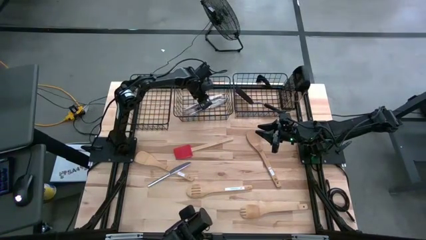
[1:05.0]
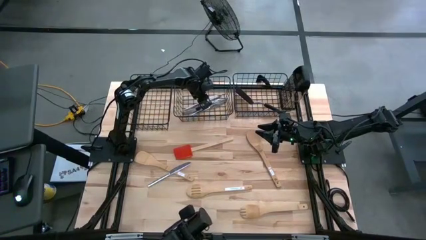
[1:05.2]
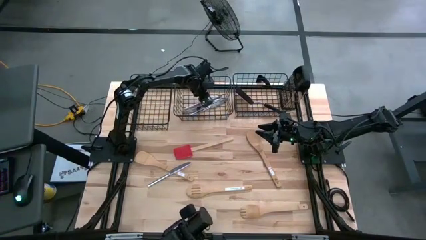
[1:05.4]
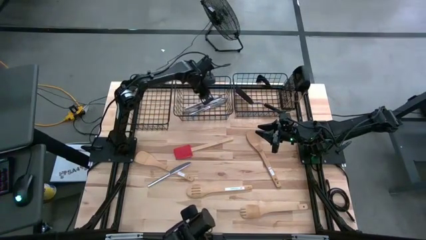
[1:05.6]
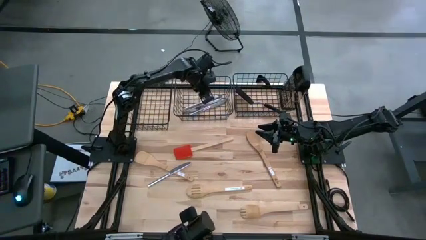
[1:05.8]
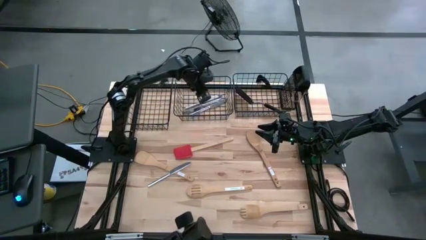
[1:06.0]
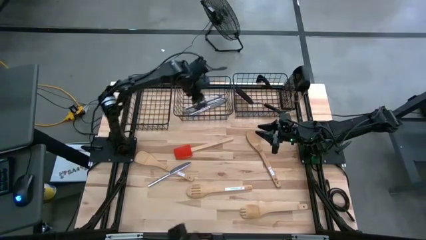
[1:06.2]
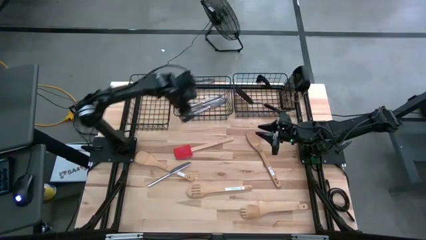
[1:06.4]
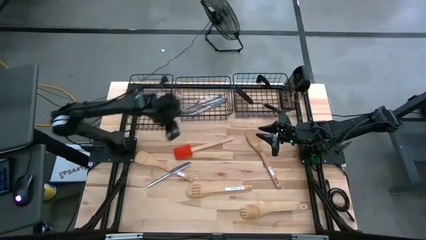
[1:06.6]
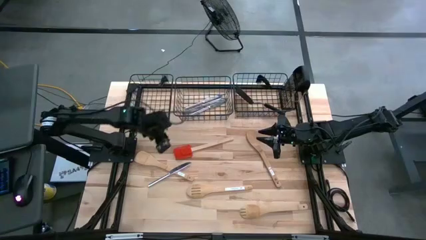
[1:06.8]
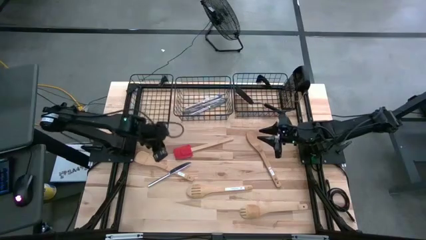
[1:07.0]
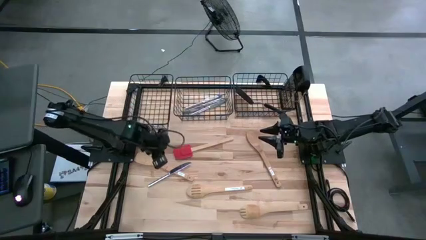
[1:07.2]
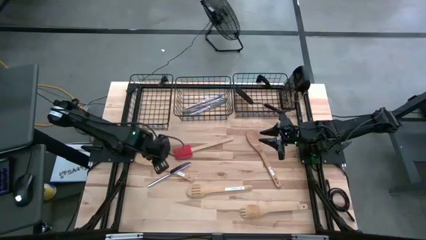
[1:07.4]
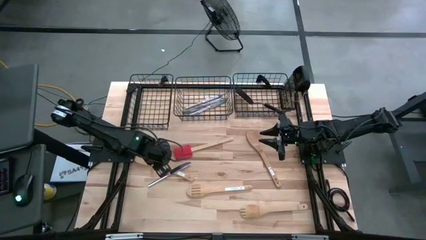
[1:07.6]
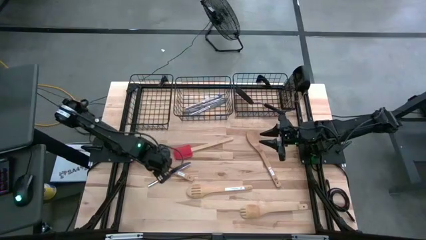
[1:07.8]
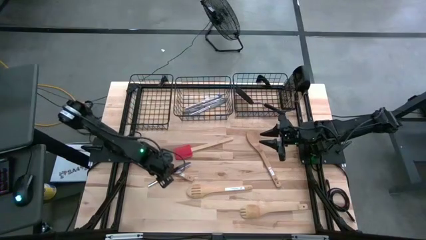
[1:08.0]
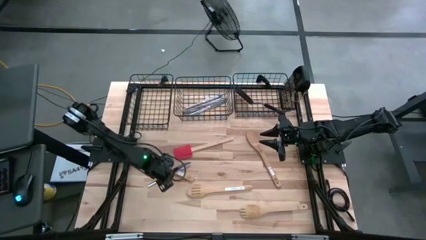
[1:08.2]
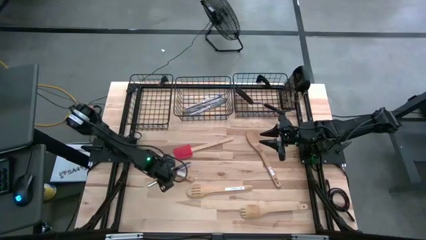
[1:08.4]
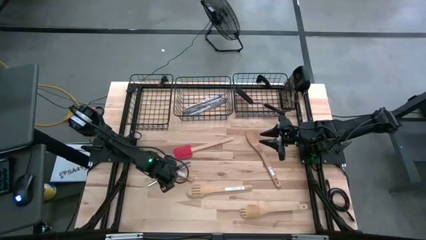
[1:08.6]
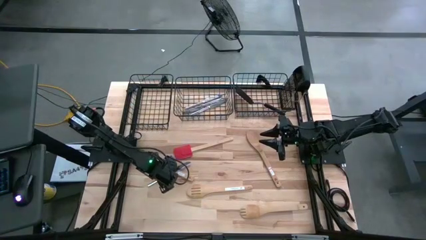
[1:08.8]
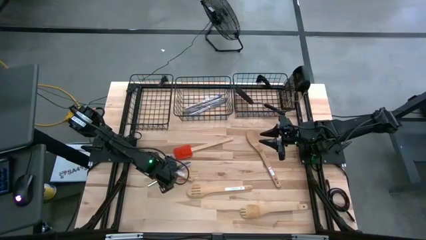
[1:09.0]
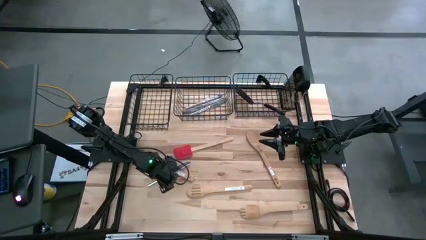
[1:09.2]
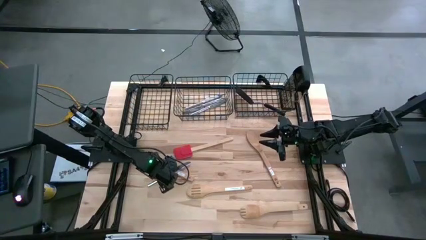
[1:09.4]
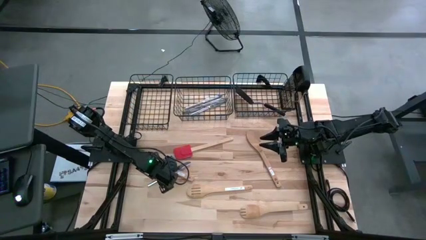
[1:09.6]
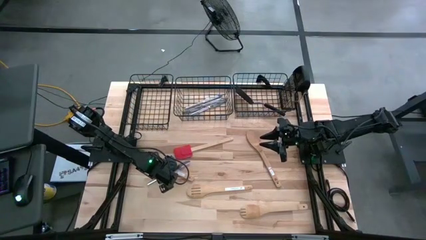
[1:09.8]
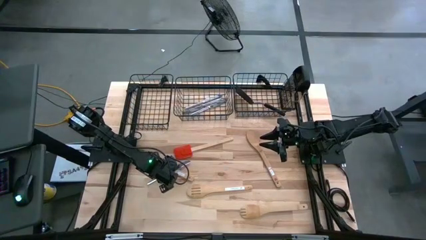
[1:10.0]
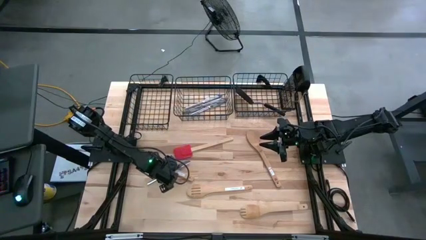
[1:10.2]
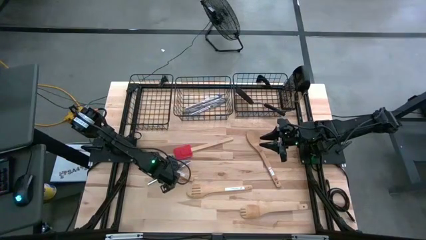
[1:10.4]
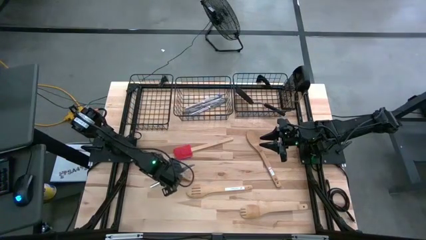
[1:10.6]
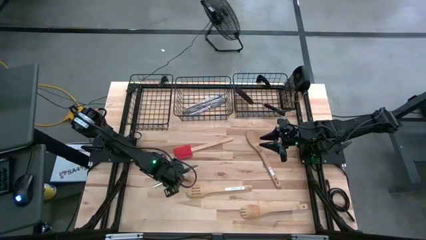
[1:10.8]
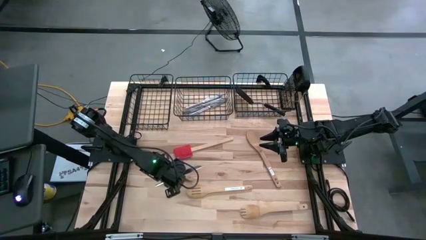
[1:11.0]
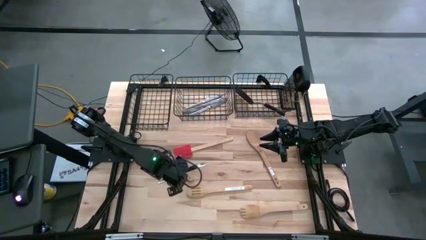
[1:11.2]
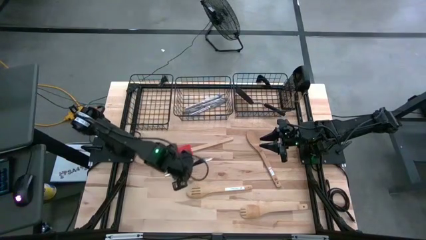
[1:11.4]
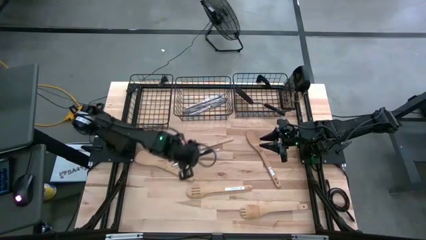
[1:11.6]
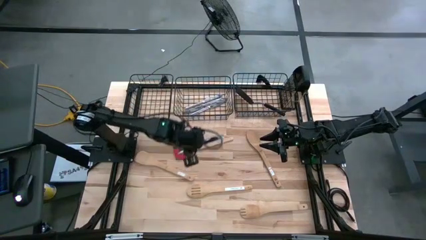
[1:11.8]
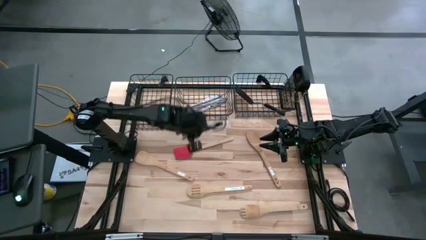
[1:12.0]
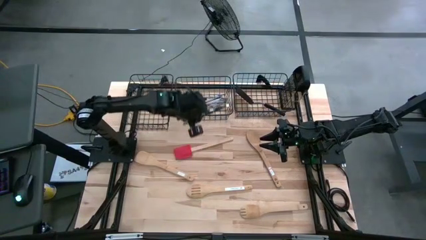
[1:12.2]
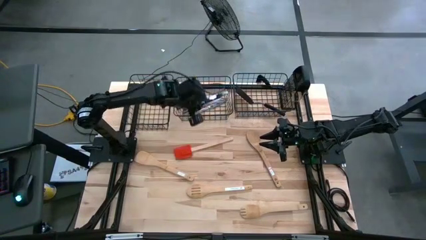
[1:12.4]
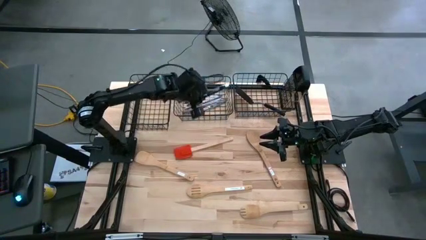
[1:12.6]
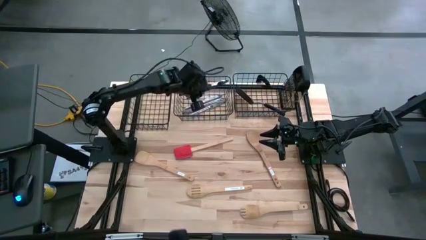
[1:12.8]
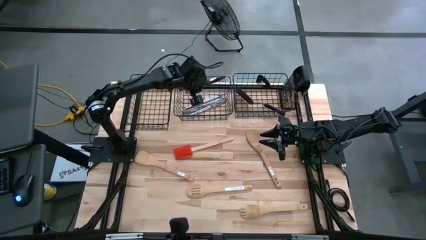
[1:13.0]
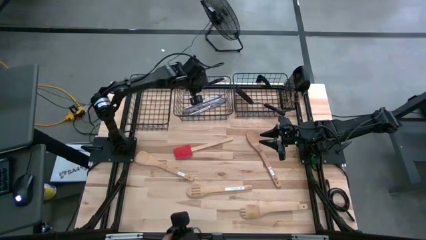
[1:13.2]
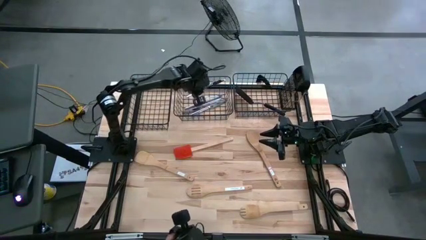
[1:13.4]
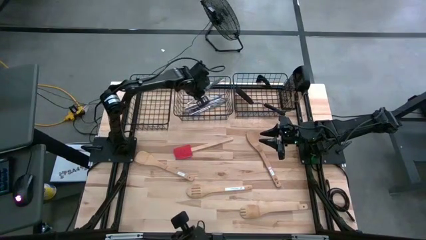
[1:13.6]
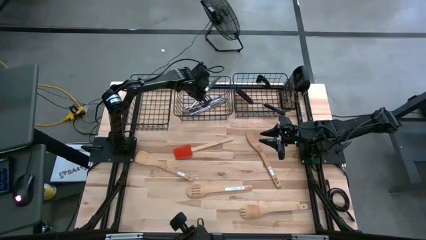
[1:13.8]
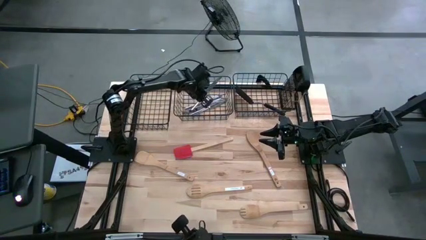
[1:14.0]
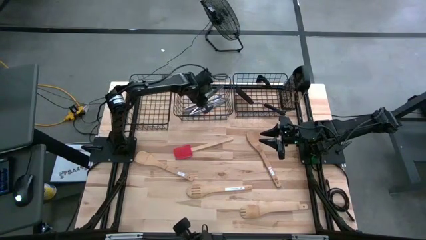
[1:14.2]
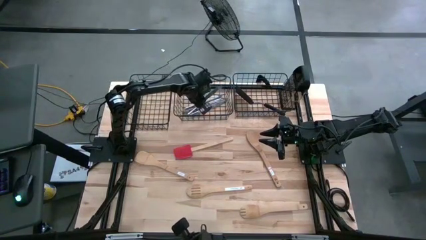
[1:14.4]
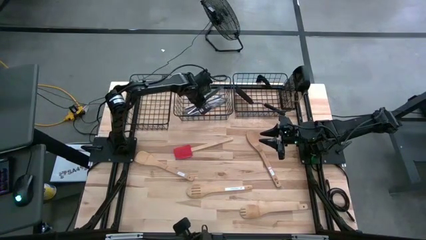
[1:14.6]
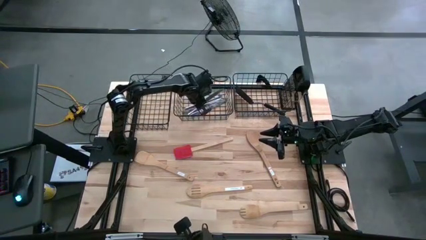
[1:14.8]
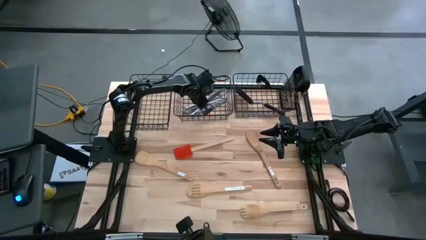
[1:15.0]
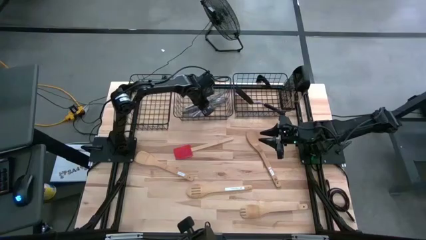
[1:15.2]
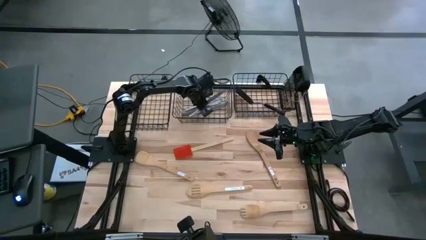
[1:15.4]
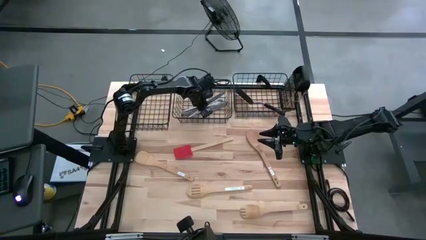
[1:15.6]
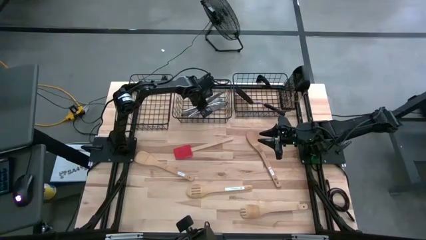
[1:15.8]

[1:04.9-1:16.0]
Task: Pick & Place Kitchen Items
Put the table knife into the middle wire basket

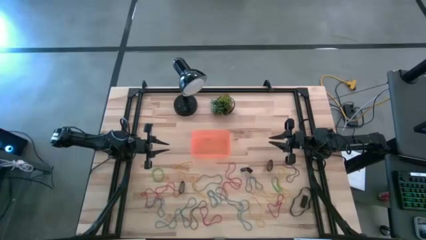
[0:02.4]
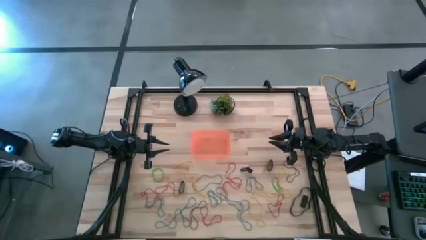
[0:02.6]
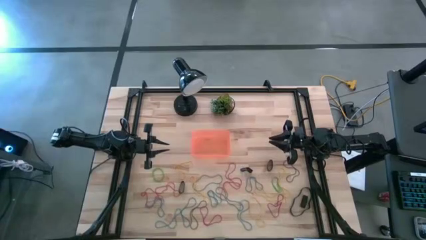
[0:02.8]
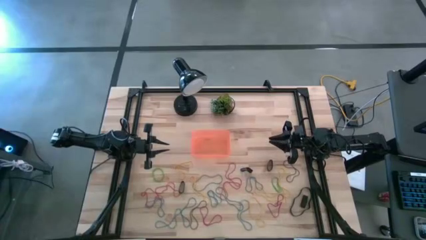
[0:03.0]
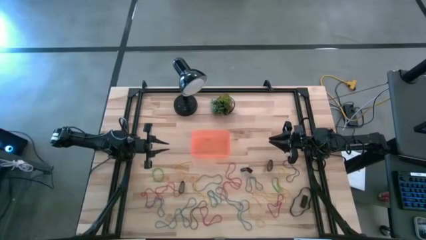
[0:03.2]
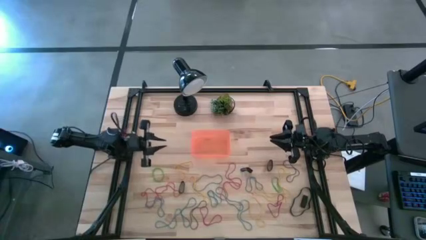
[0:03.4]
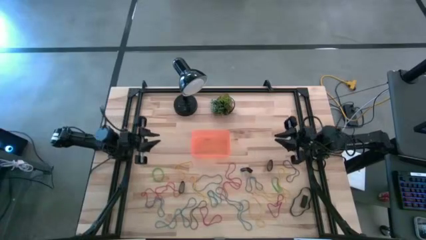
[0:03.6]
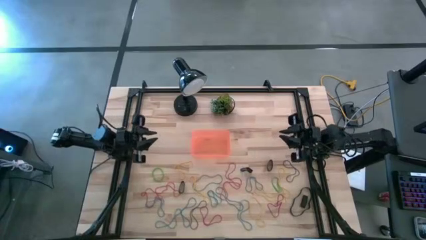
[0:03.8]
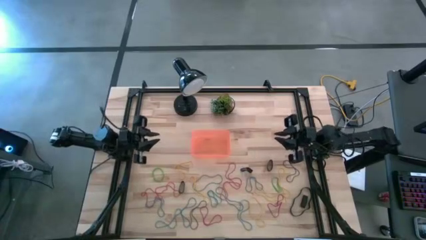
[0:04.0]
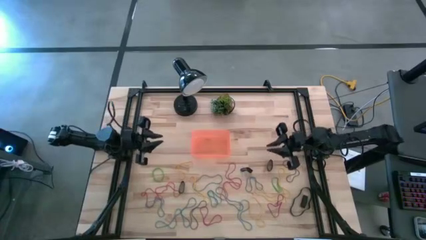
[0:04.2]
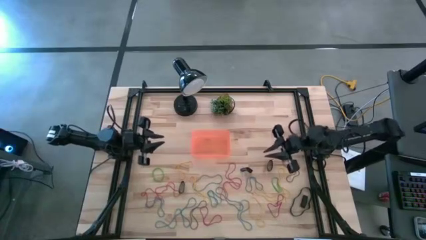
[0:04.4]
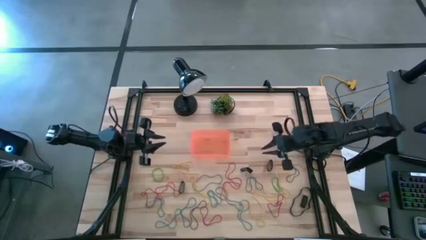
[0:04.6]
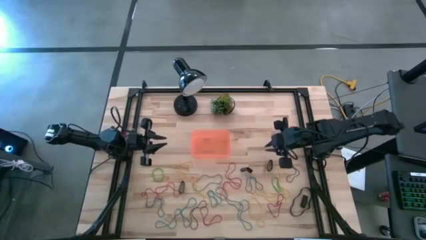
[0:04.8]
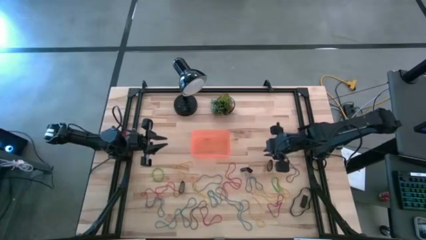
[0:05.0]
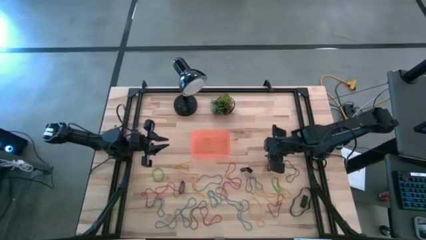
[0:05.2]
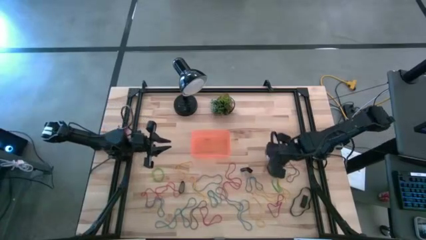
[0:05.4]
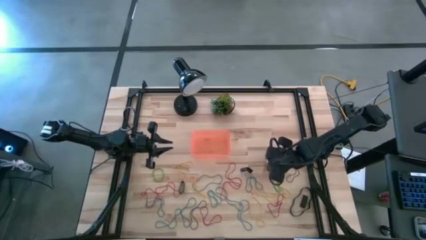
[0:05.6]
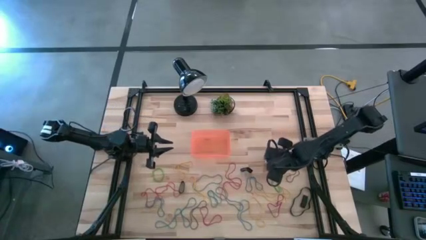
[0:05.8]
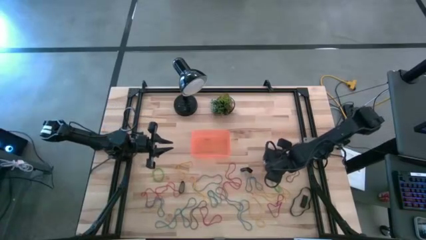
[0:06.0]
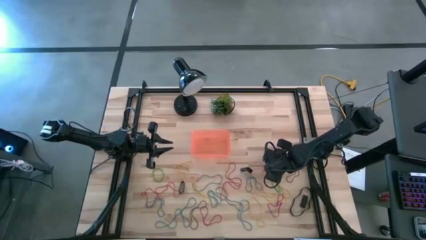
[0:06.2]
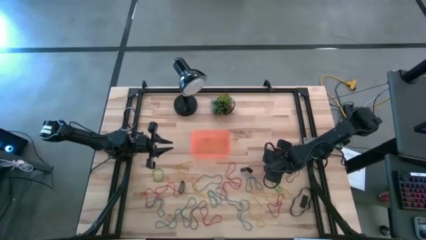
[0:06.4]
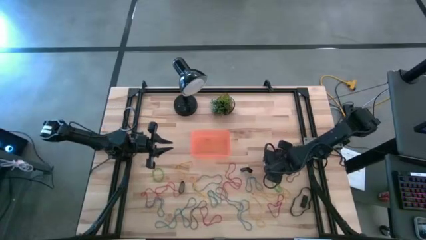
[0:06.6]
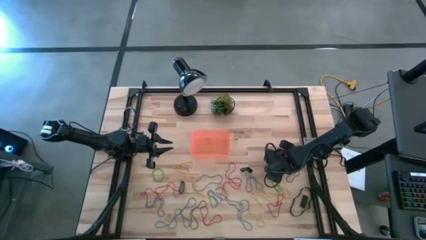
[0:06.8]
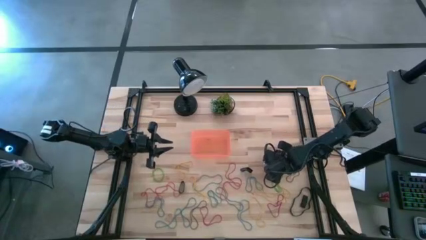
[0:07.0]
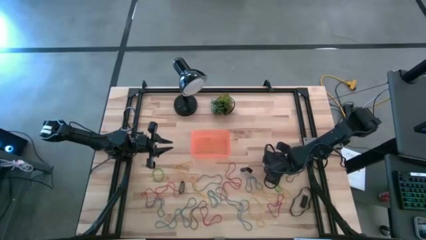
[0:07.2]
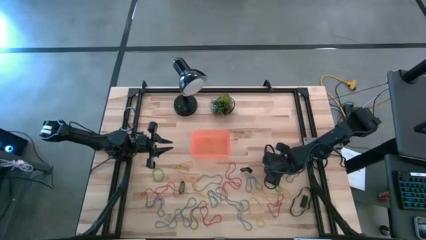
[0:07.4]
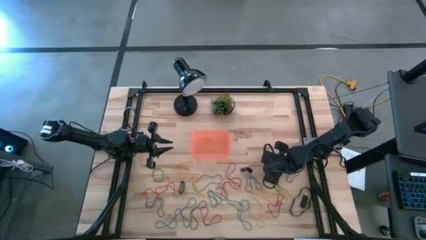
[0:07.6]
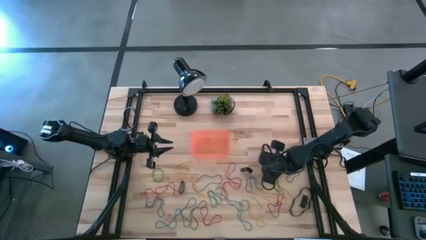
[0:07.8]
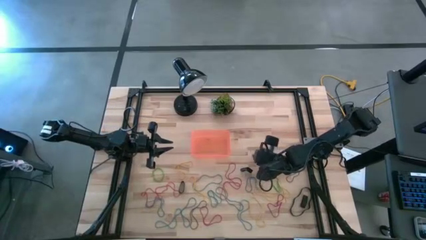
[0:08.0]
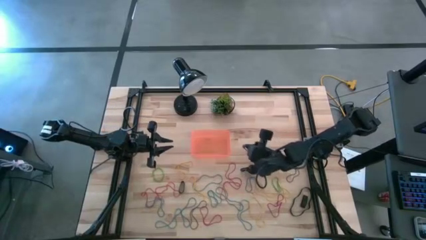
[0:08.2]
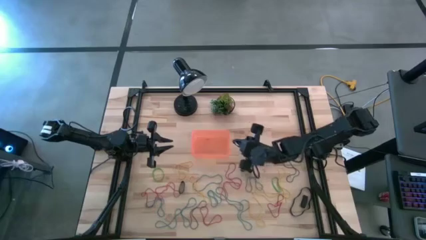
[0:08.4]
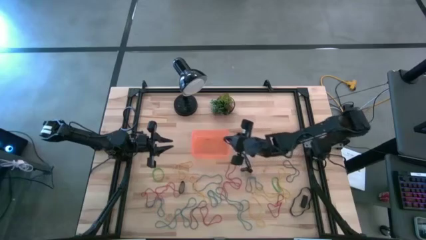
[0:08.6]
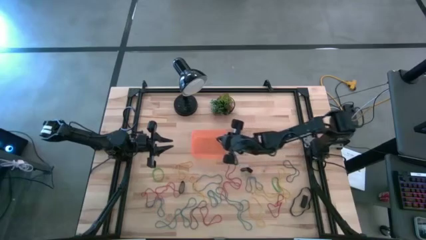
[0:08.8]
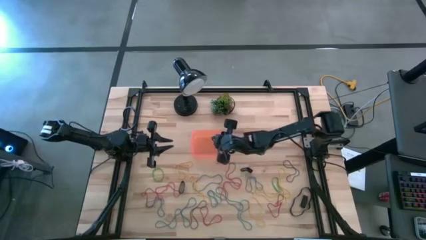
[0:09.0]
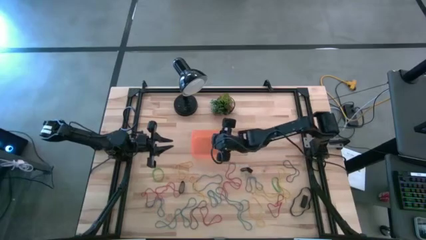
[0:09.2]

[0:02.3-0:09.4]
Task: Pick and place rubber bands into bin
Put the black rubberband into the orange bin
